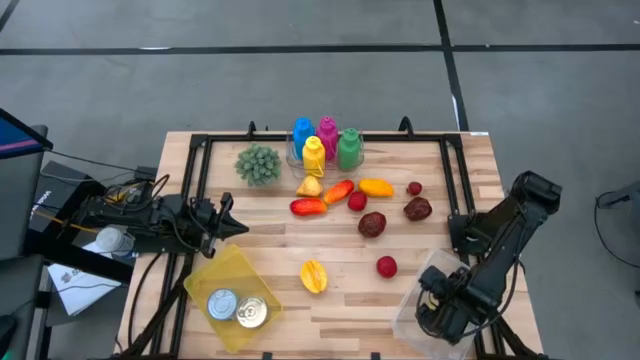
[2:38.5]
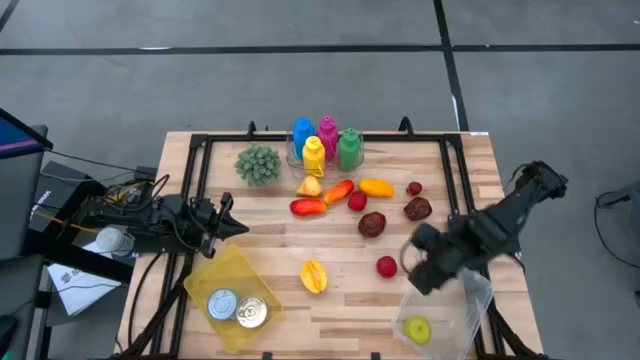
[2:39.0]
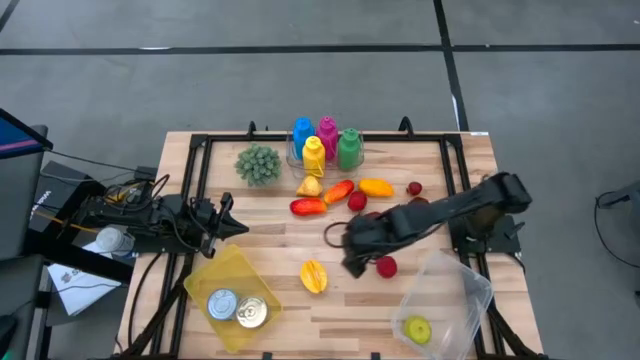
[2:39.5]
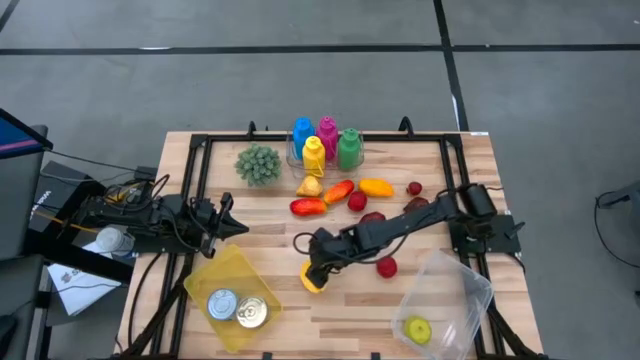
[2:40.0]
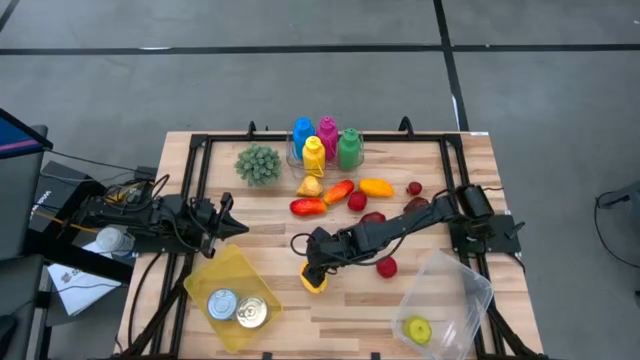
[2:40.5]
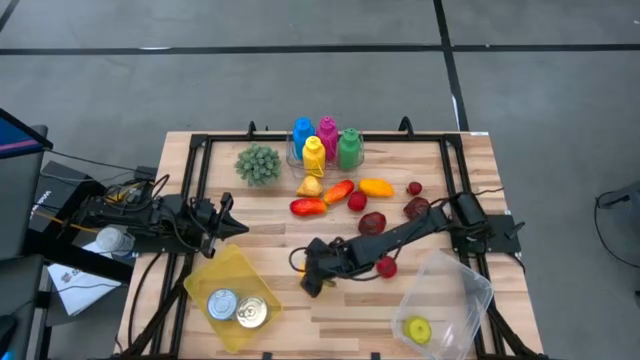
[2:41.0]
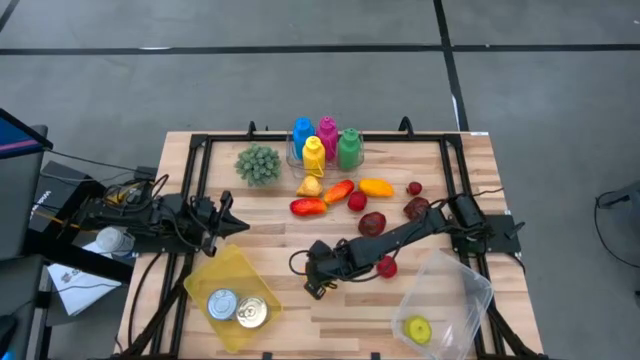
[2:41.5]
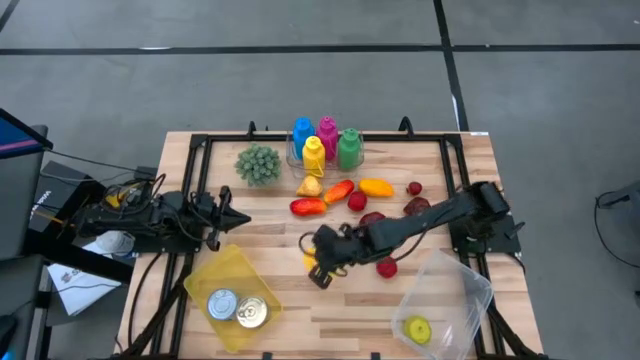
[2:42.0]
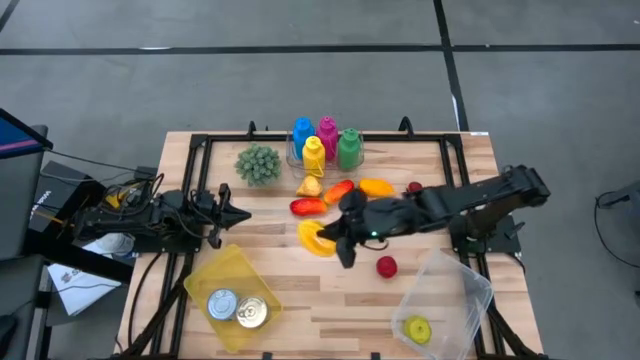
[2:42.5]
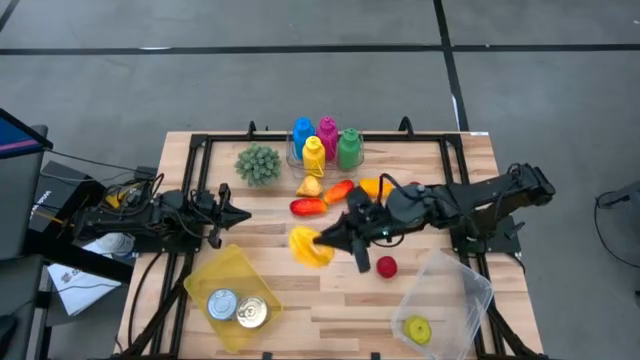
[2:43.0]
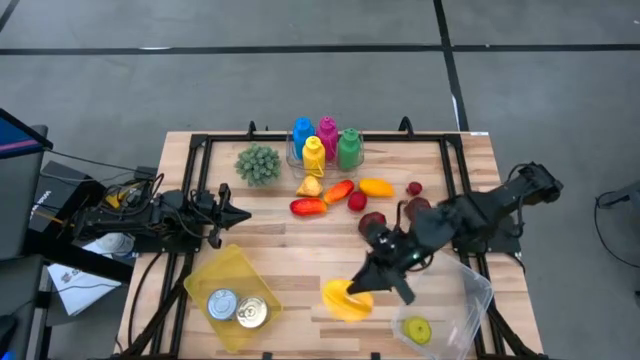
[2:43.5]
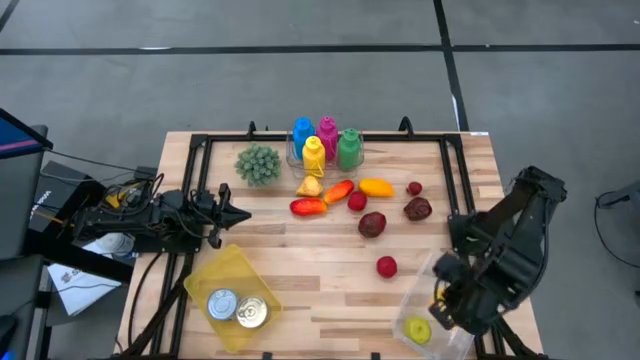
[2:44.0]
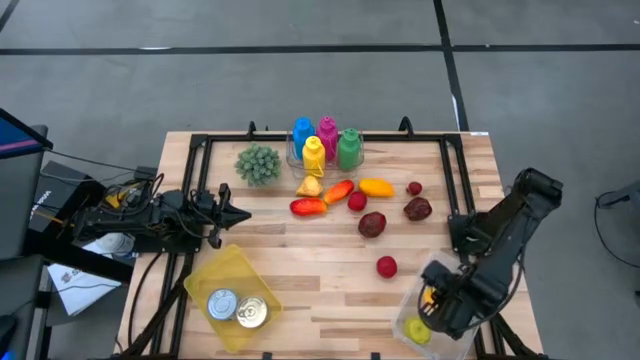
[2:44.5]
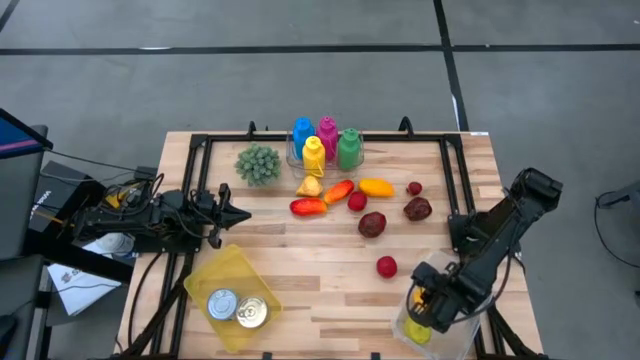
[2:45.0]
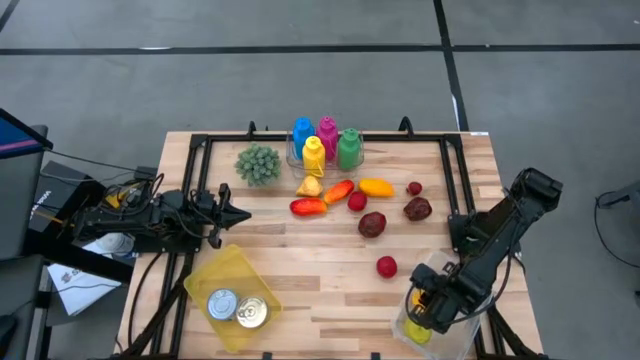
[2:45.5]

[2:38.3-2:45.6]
Task: Pick & Place Food Item
Put the yellow starfruit into the white bin

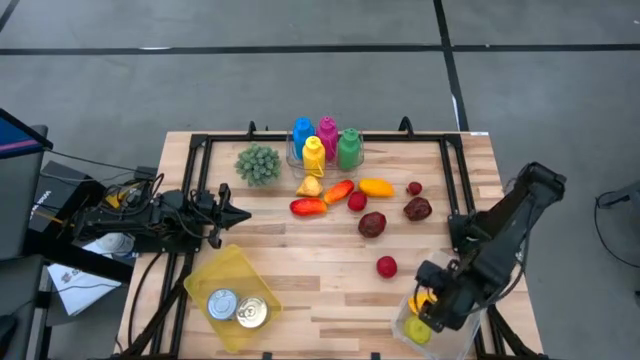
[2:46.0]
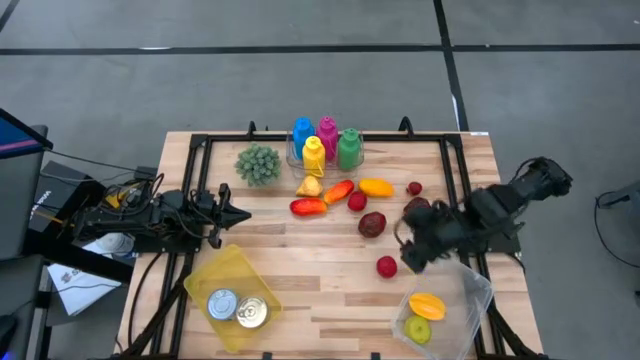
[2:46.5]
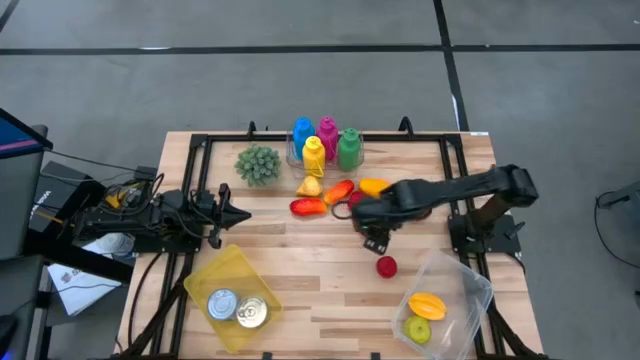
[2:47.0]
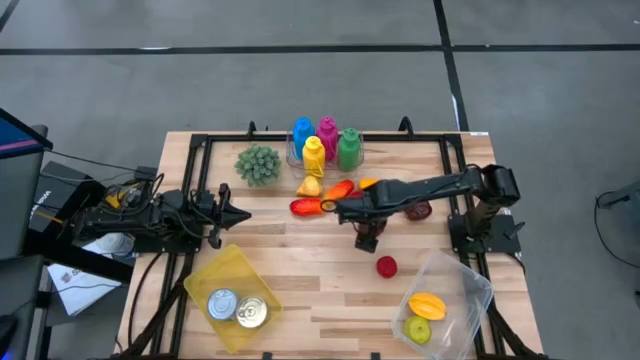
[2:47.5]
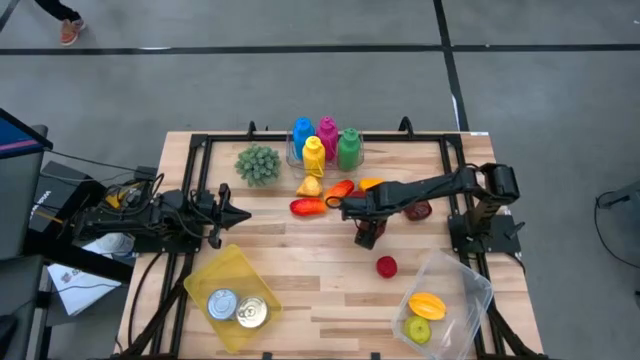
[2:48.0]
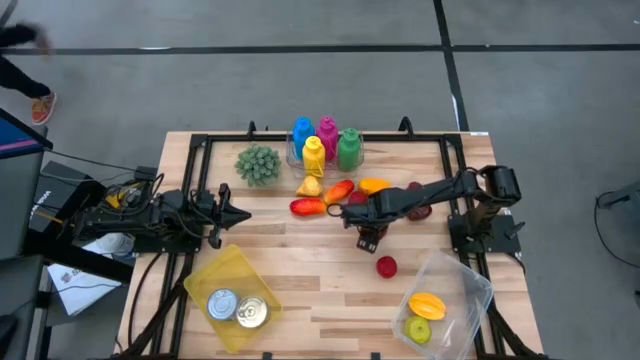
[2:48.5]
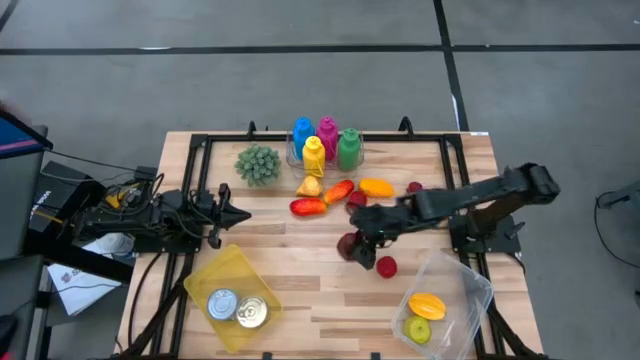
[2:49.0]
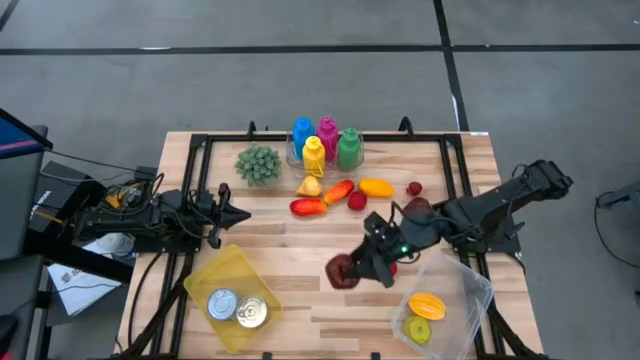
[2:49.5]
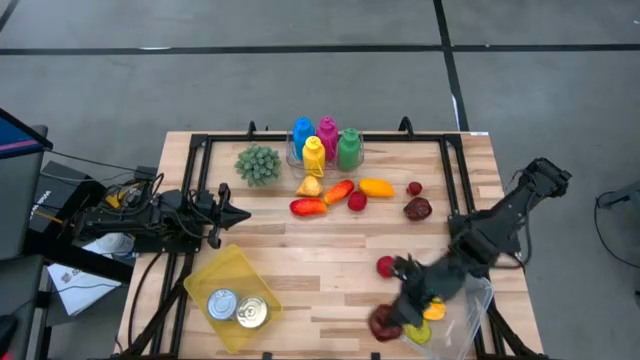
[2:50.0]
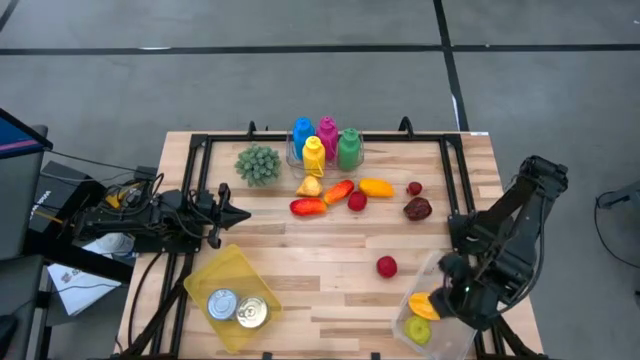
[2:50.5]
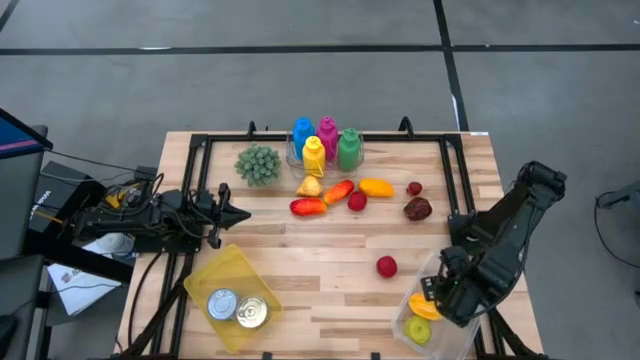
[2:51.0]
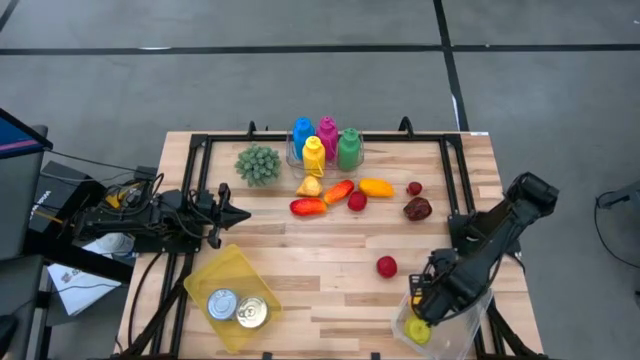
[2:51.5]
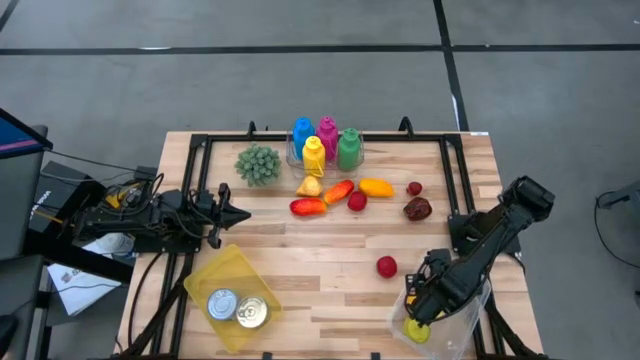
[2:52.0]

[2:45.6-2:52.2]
Put the left dark red apple into the white bin

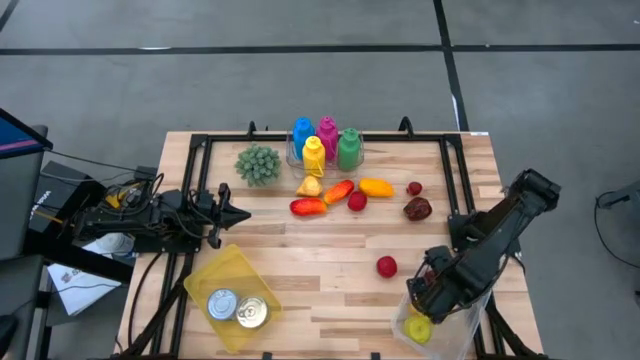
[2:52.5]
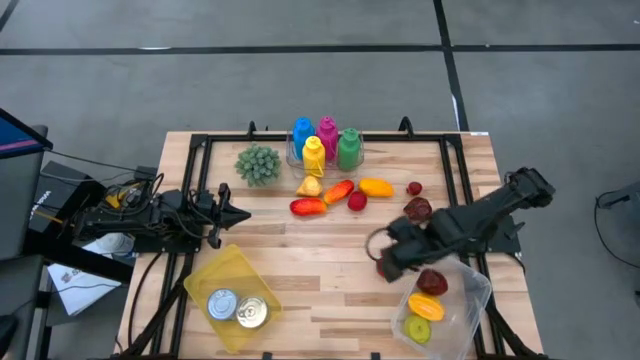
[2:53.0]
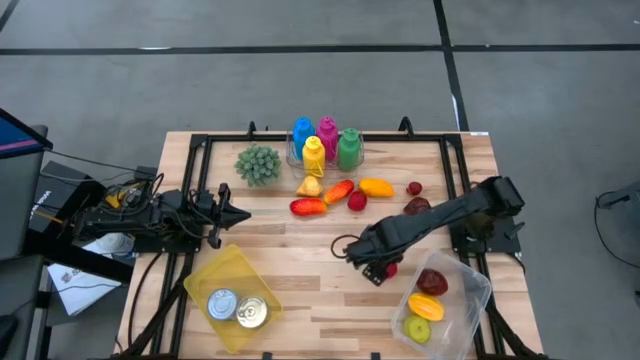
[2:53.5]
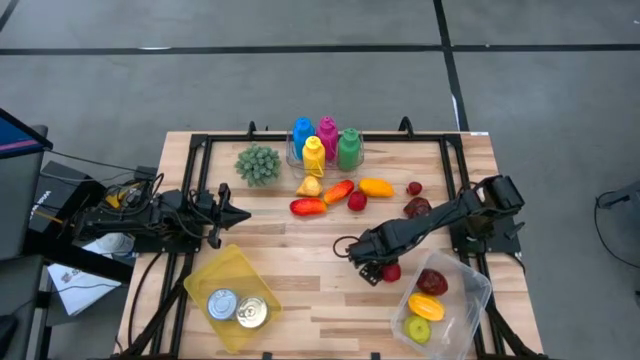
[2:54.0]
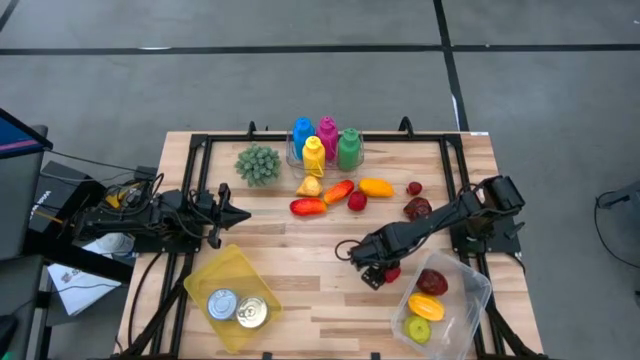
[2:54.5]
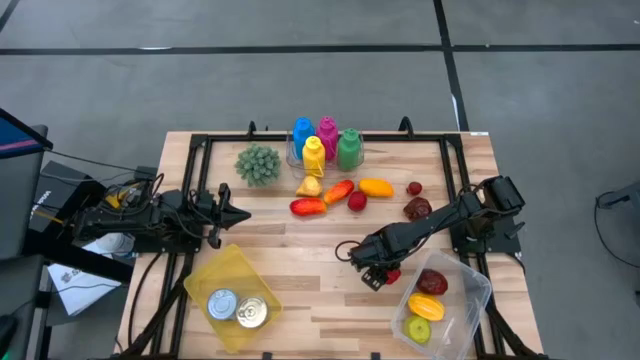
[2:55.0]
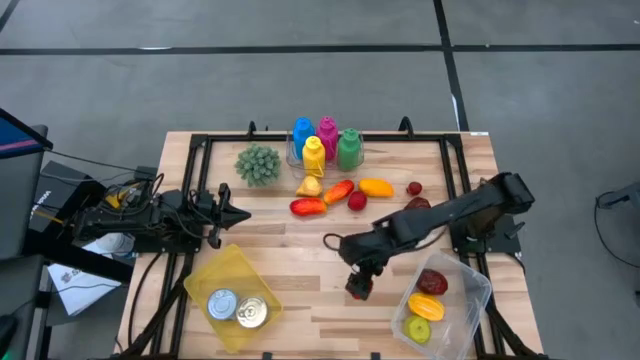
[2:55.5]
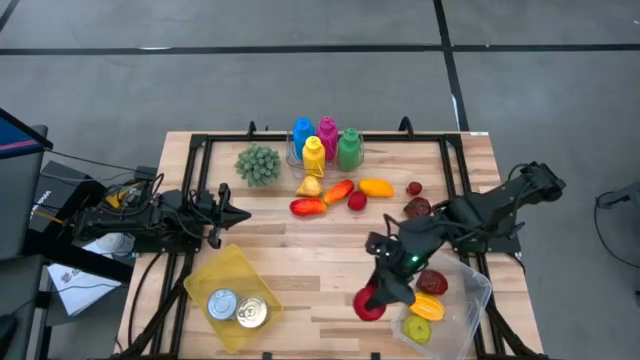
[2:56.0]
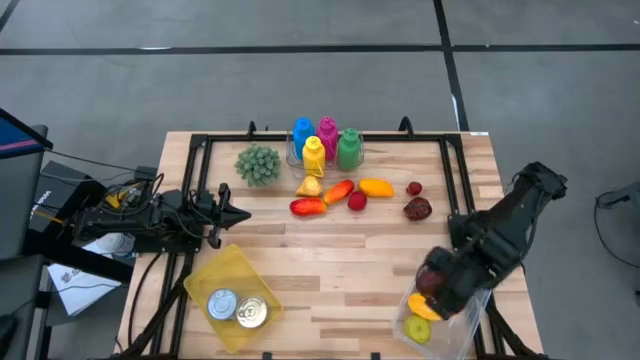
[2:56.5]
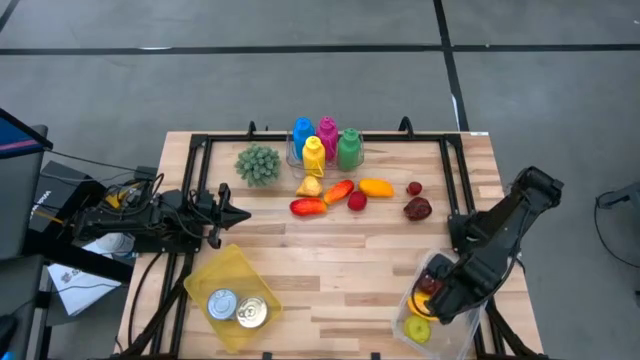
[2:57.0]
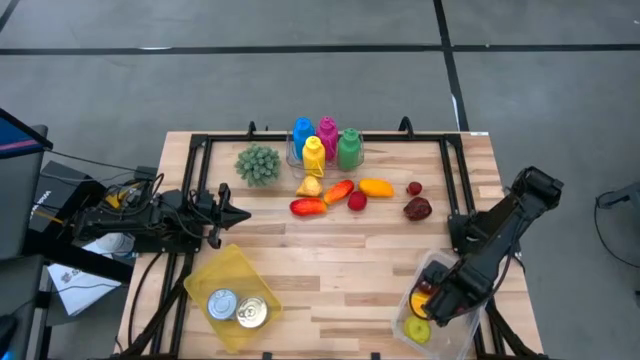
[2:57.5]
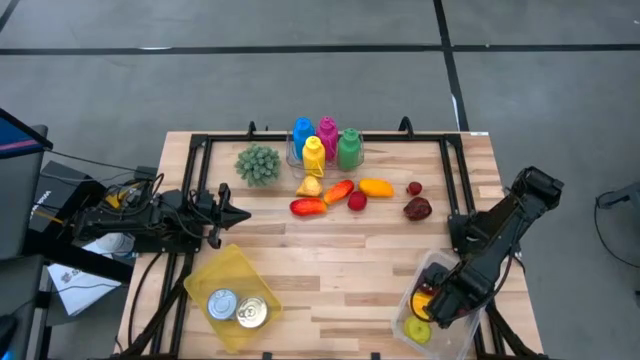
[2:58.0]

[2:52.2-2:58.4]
Put the bottom red tomato into the white bin

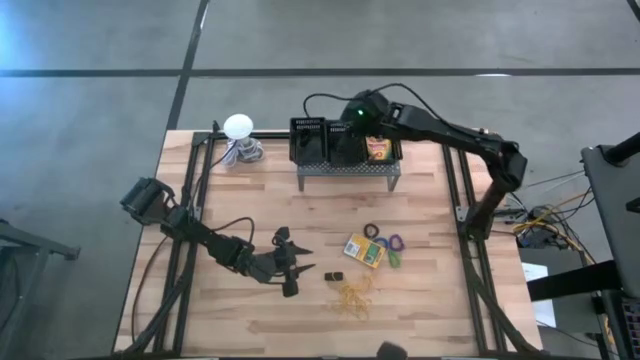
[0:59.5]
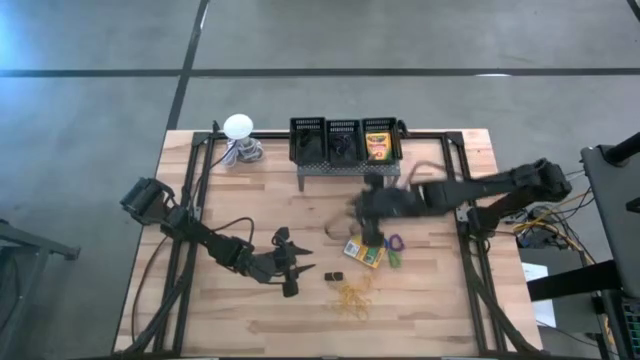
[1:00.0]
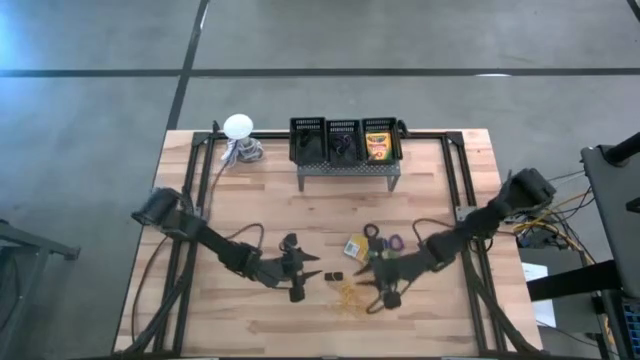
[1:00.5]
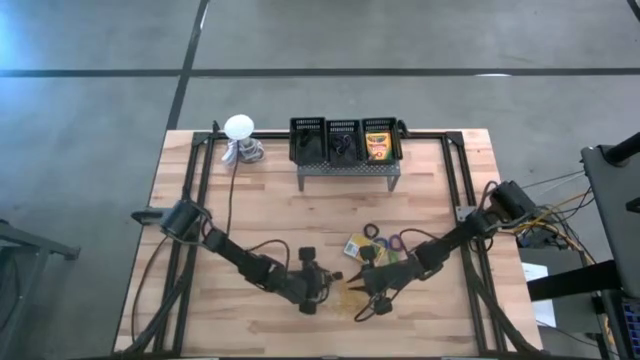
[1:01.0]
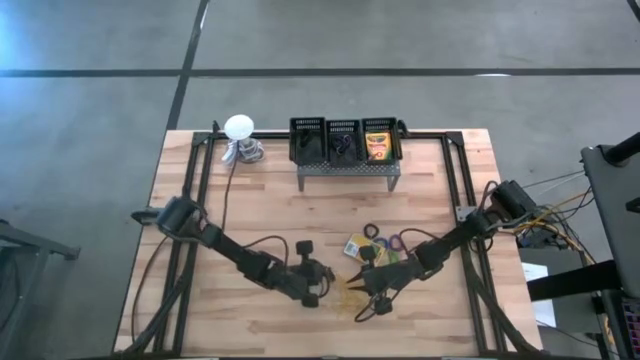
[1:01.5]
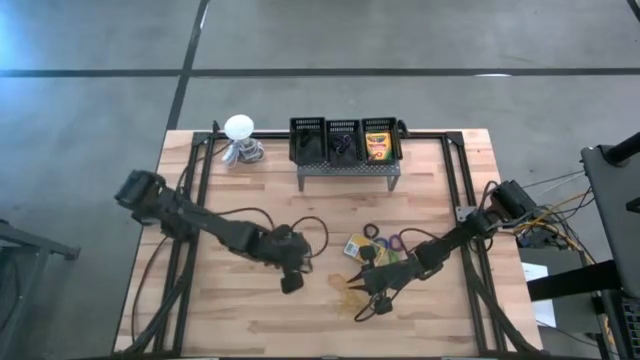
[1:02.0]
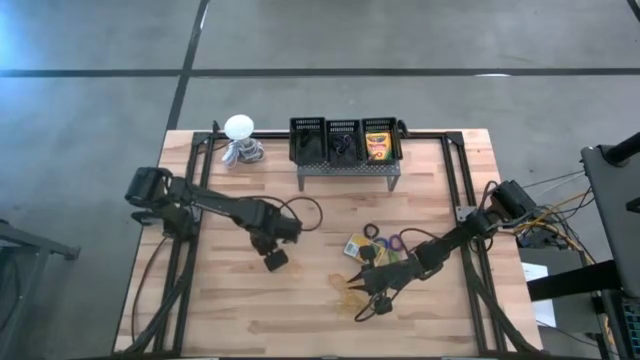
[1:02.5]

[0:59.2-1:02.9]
Task: Pick & Place Office Desk Supplies
Put the black rubber band into the left black bin on the shelf
